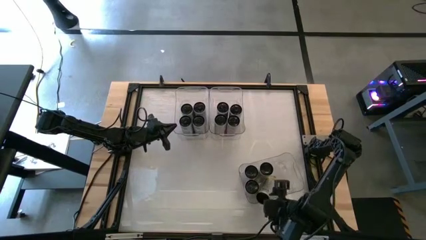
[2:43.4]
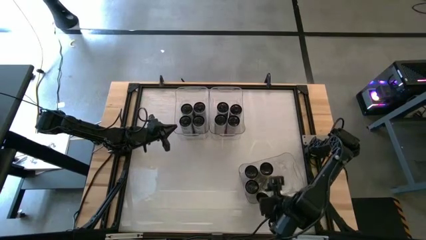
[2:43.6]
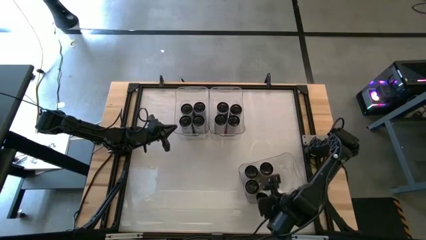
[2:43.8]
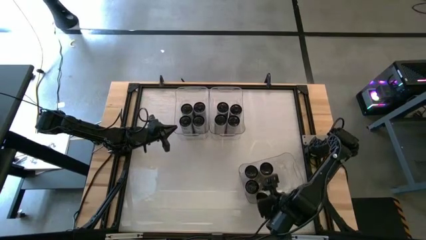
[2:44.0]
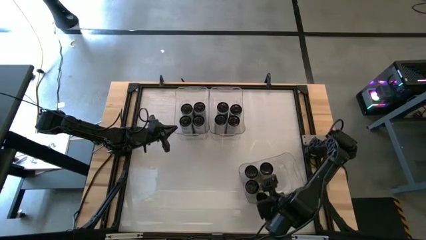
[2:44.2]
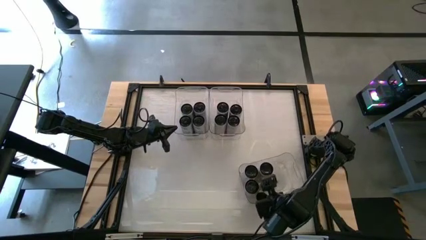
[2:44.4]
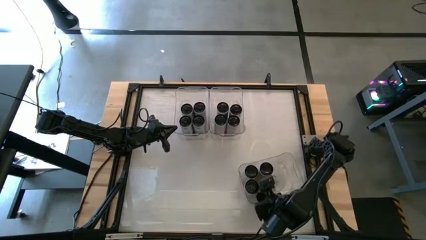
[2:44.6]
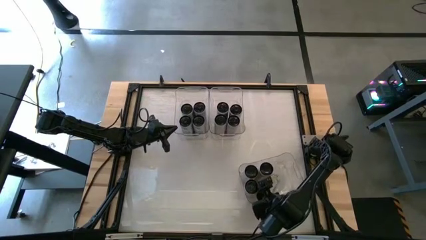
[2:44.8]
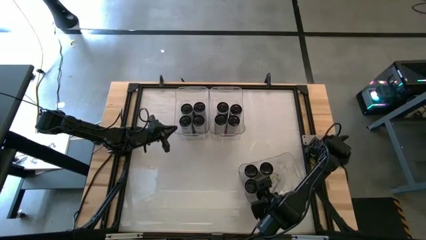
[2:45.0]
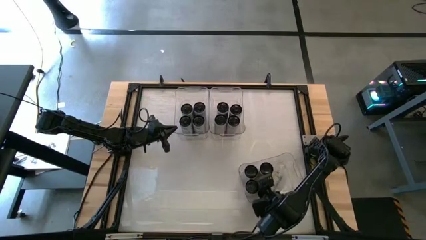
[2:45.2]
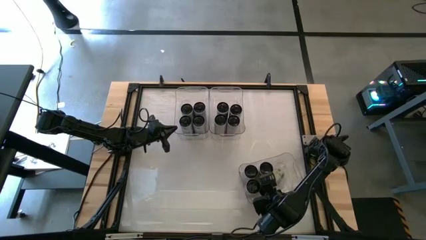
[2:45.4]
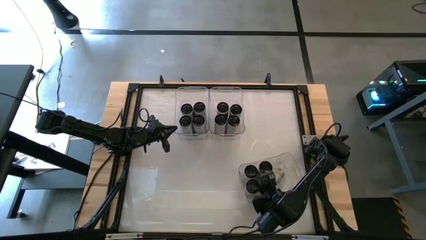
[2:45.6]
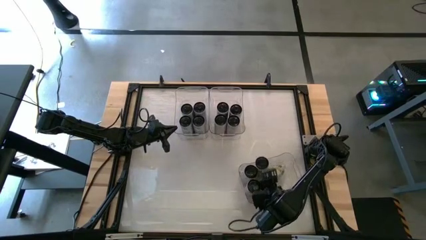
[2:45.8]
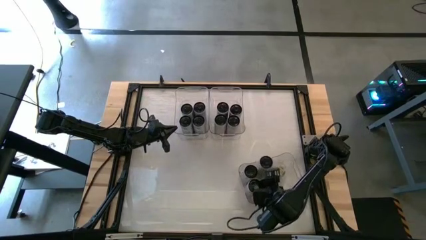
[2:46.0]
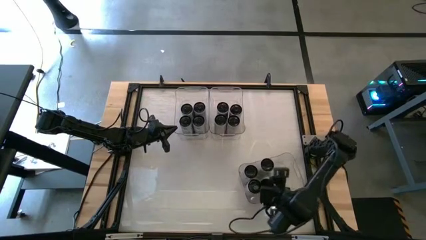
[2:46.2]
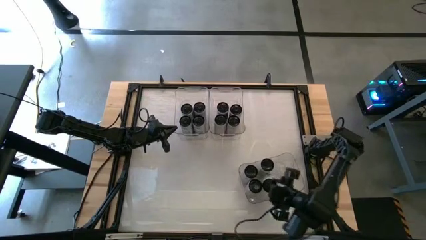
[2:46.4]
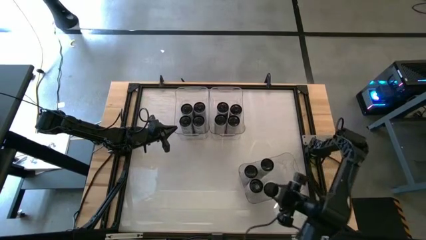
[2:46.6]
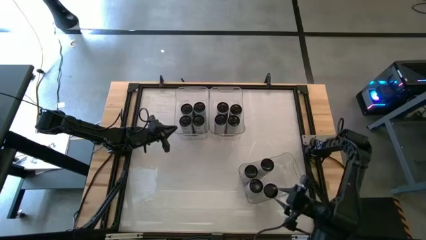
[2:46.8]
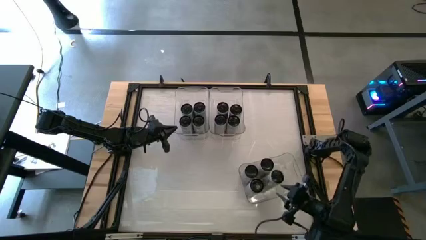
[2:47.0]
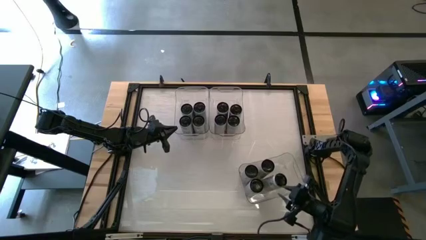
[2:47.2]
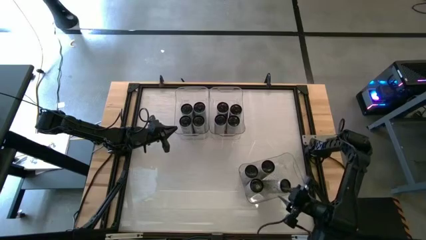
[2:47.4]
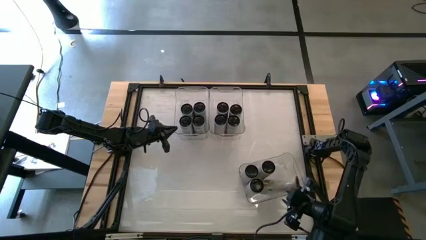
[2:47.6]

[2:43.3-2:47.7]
Task: Sort soda cans
Adjust the soda can in the bottom right transparent bin

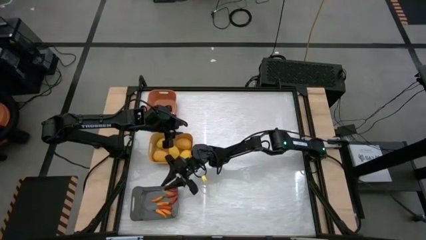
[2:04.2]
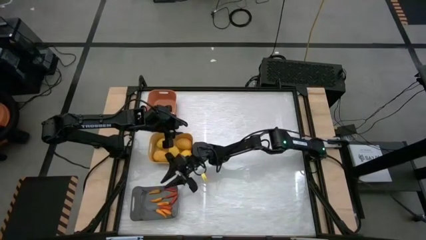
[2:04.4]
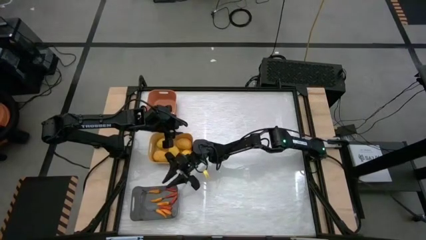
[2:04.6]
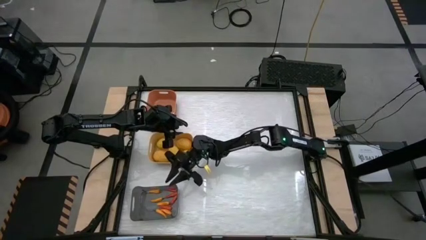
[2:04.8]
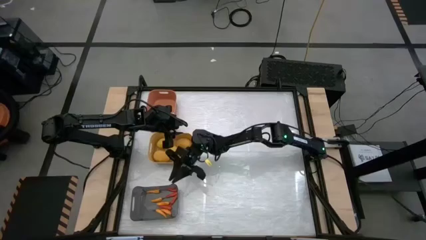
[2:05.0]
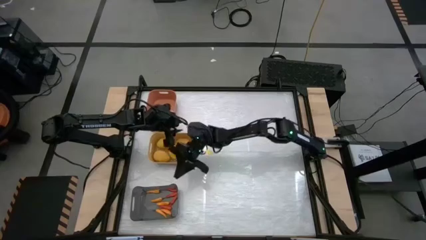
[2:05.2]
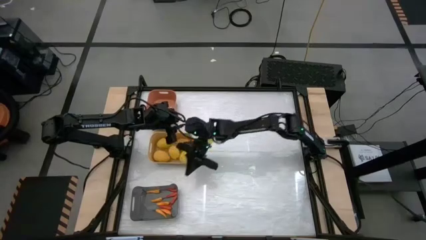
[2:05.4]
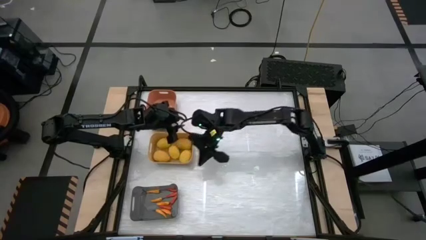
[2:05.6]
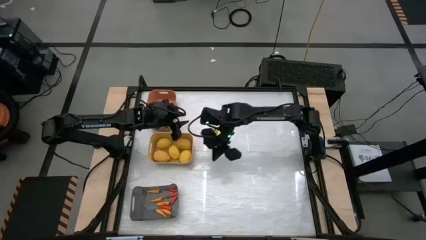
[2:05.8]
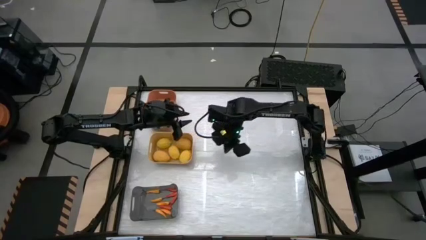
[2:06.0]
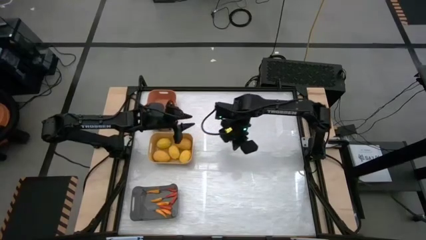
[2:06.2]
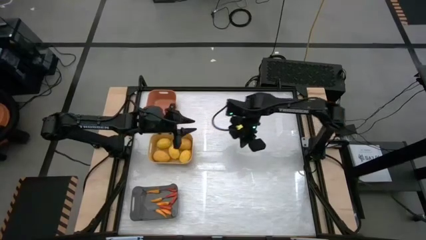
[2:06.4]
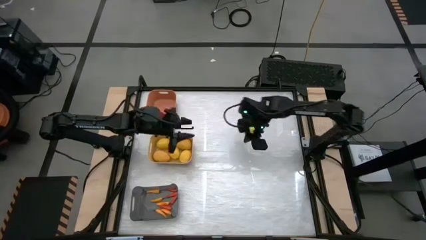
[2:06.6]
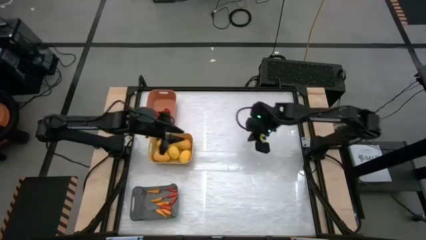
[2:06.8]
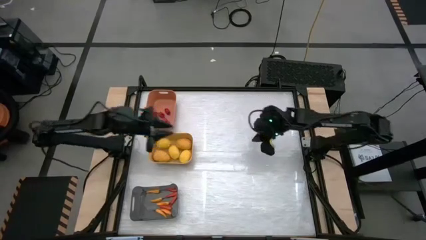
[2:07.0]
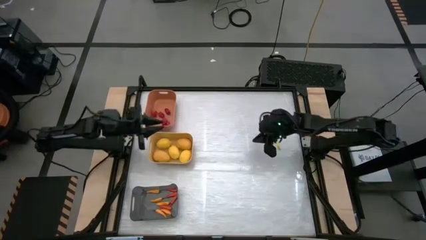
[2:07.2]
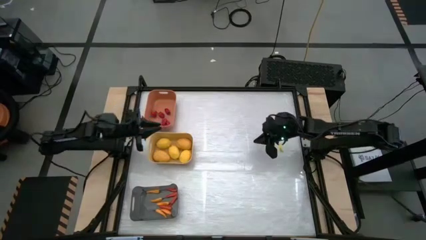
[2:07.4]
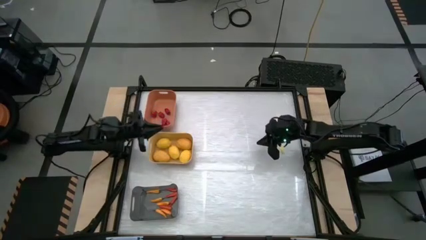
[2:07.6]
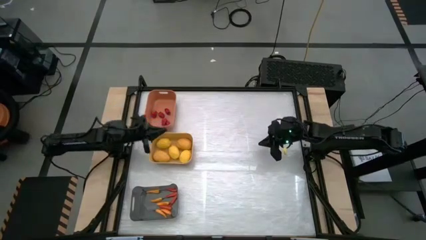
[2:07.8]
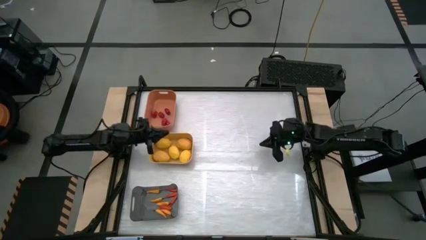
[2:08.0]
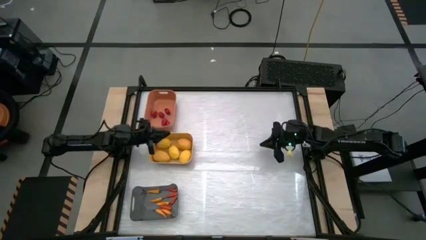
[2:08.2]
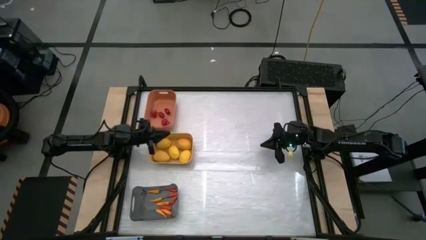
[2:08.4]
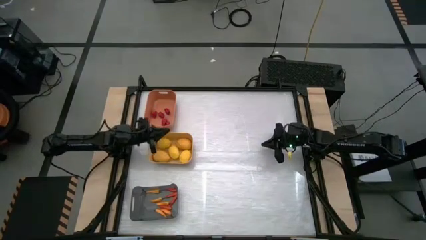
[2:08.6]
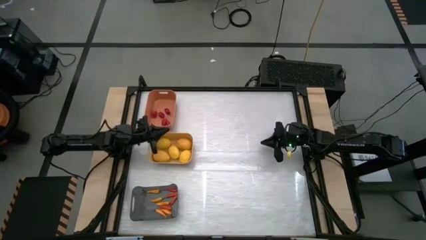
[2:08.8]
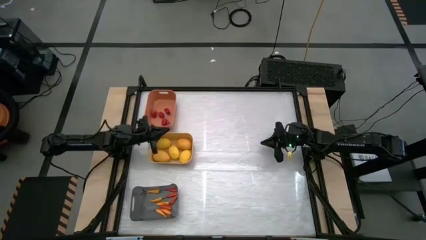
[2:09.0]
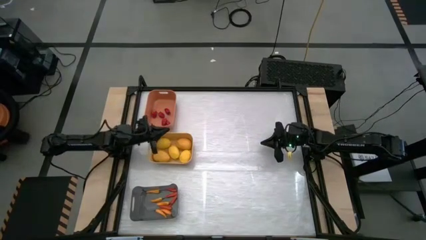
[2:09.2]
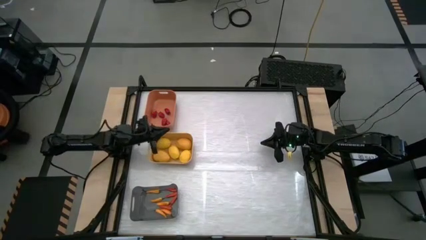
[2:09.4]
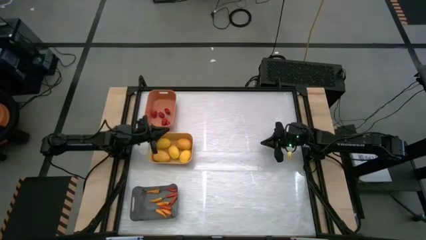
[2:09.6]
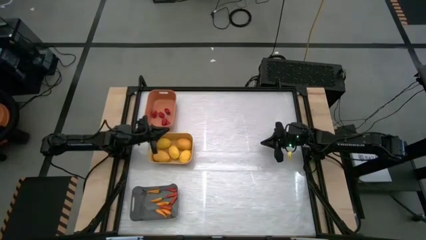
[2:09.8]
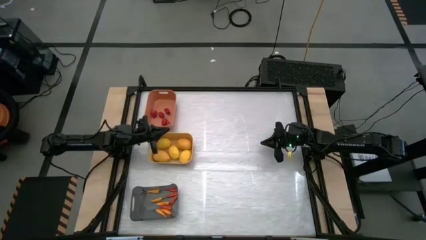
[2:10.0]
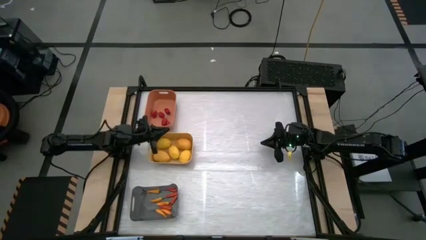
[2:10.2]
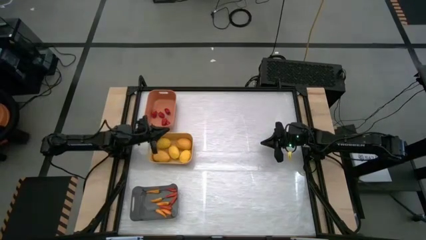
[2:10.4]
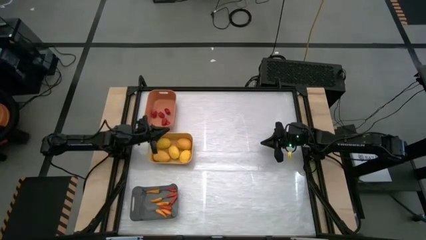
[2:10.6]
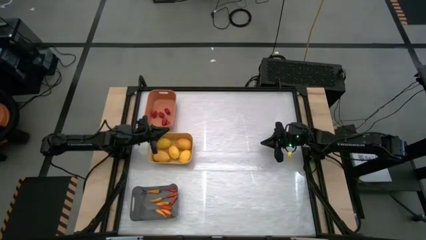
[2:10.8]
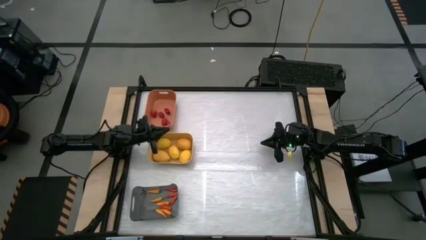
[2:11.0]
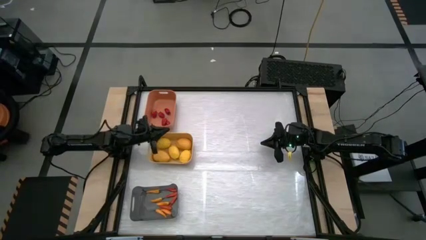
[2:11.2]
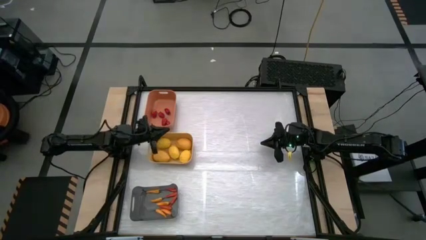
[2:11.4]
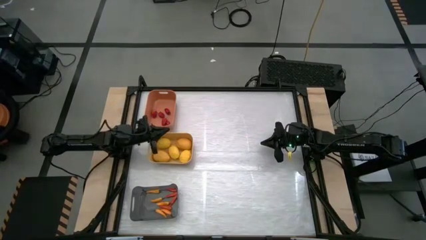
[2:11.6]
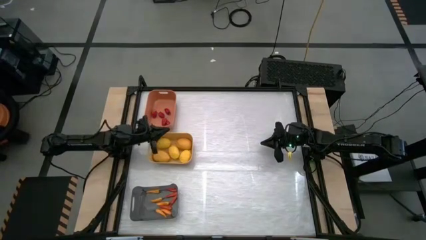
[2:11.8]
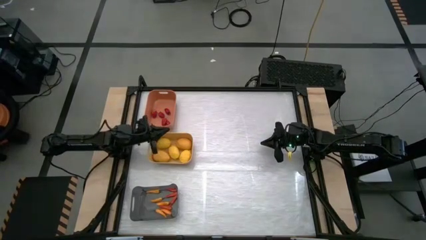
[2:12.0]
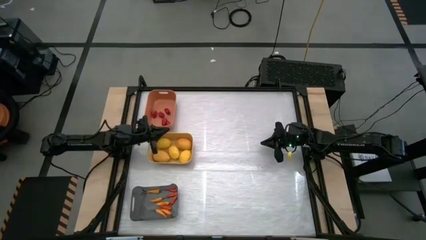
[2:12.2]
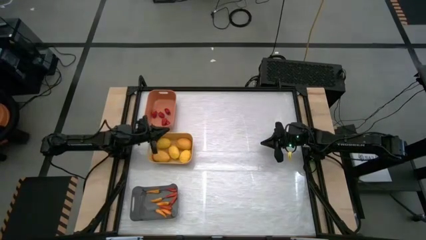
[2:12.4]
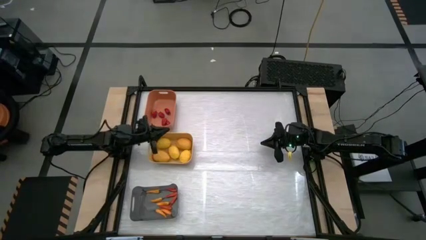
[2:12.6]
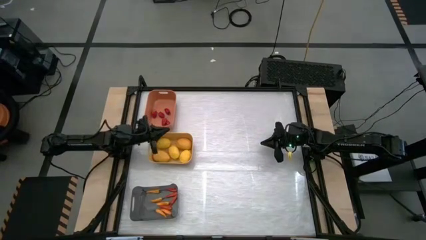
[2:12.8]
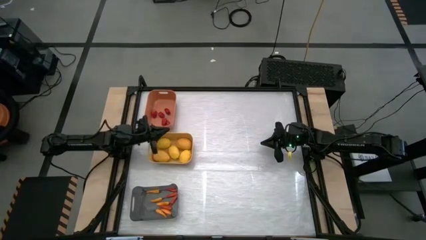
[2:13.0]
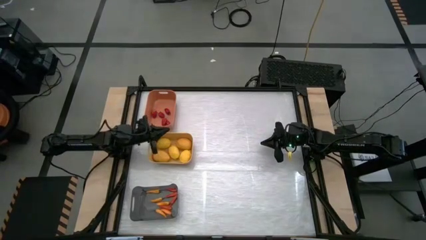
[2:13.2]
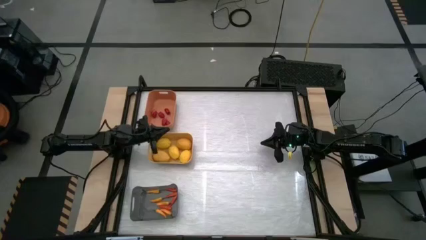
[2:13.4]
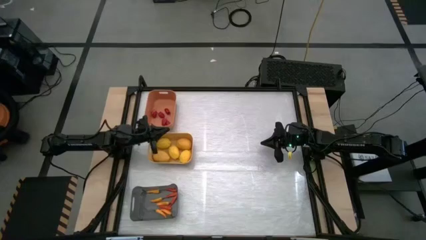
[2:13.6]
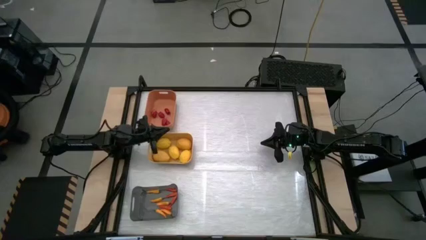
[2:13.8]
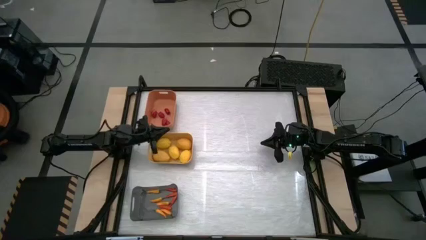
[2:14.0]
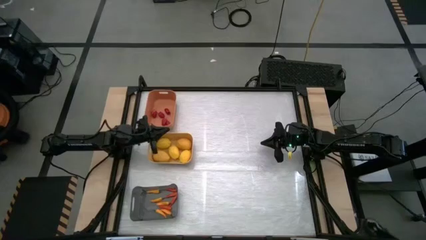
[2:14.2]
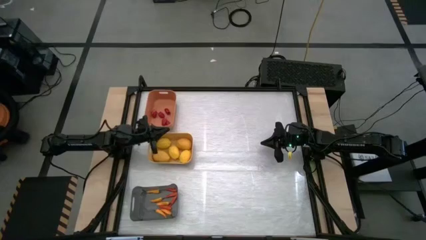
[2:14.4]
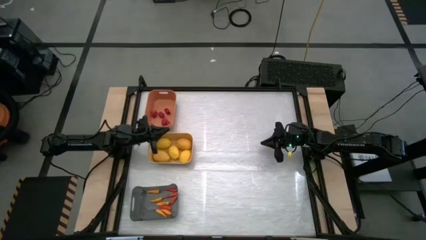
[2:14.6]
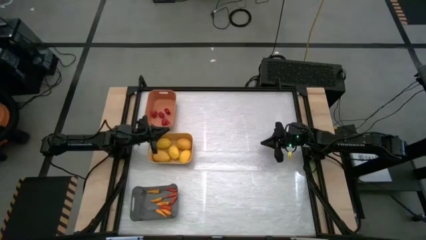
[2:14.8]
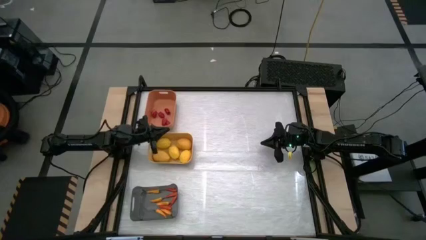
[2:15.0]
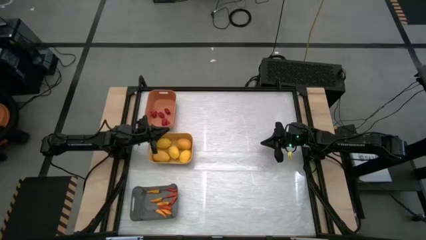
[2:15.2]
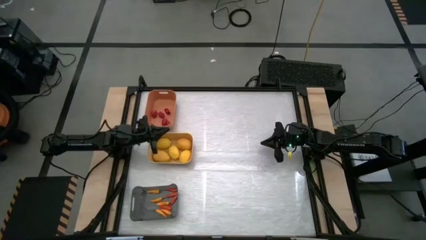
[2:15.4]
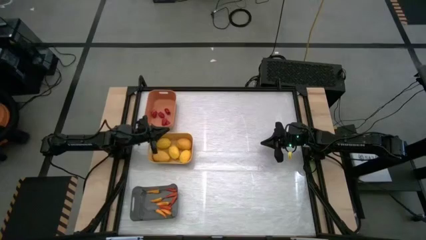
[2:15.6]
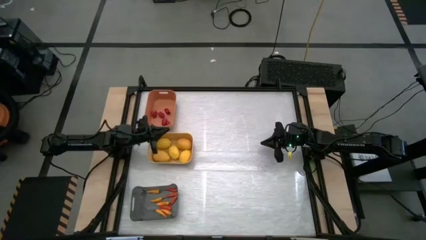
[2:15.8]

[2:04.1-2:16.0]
Task: Sort produce into baskets
Return to Home Position
